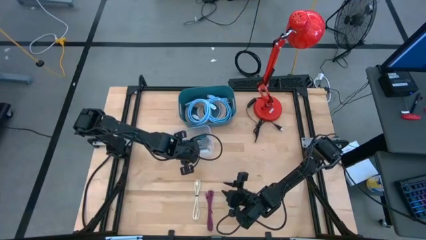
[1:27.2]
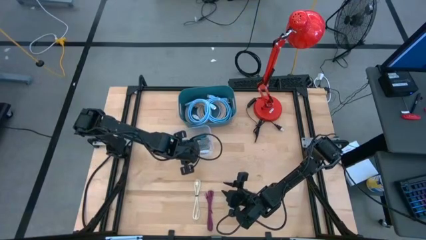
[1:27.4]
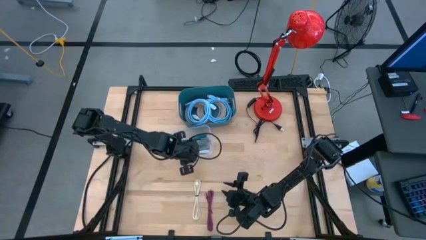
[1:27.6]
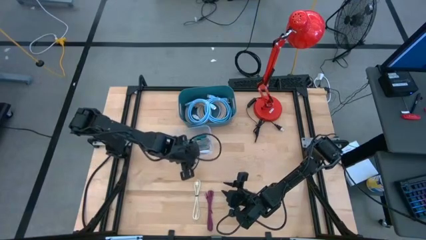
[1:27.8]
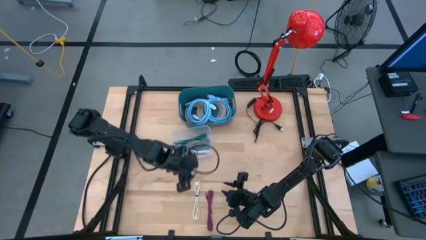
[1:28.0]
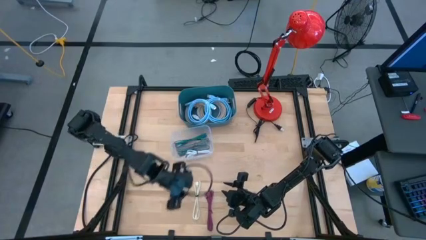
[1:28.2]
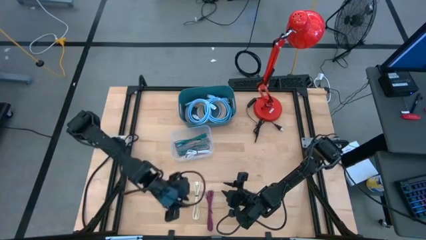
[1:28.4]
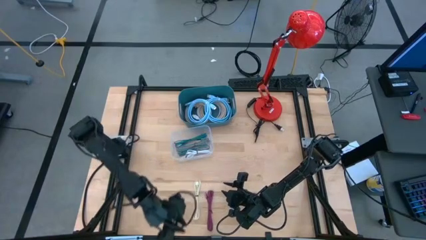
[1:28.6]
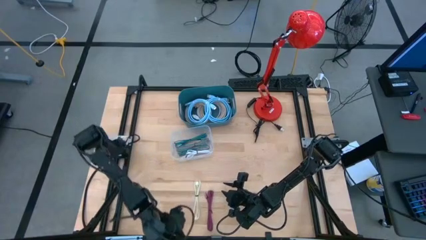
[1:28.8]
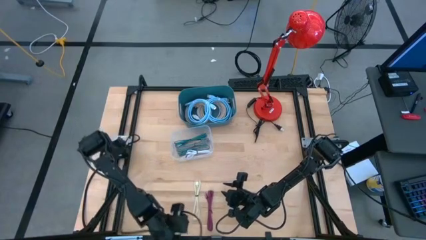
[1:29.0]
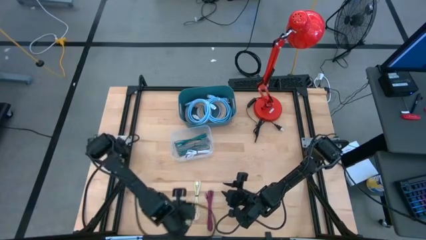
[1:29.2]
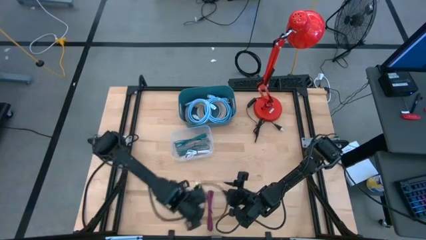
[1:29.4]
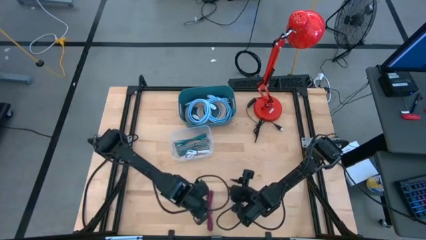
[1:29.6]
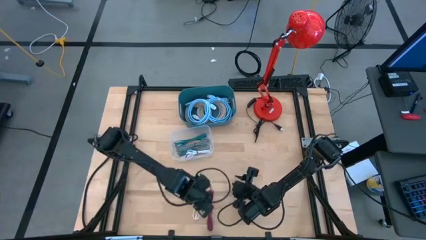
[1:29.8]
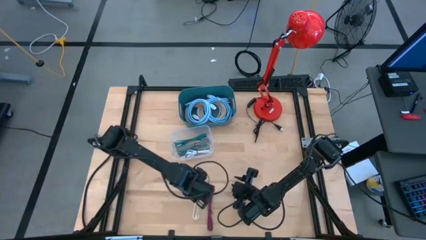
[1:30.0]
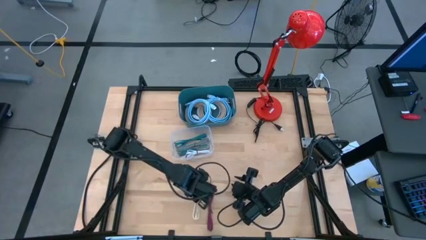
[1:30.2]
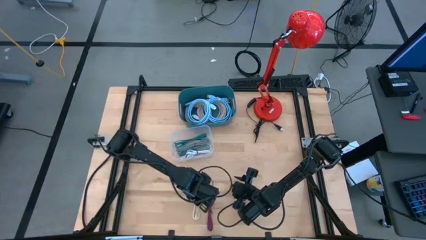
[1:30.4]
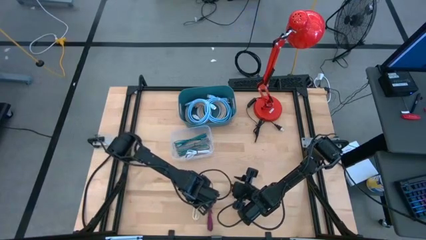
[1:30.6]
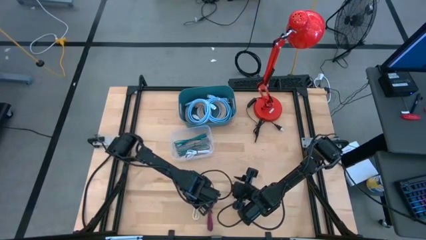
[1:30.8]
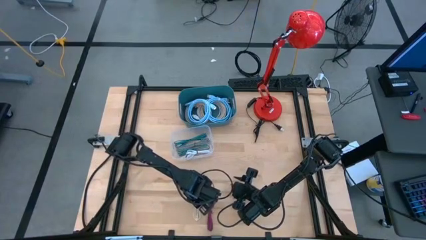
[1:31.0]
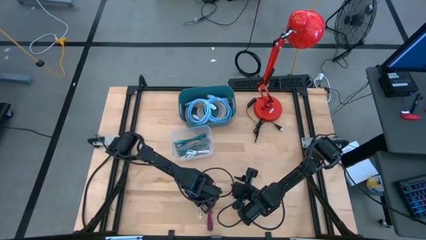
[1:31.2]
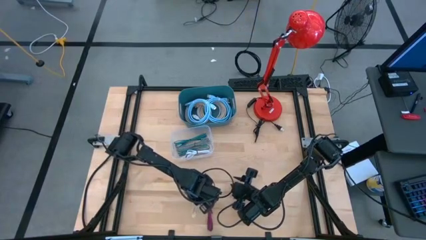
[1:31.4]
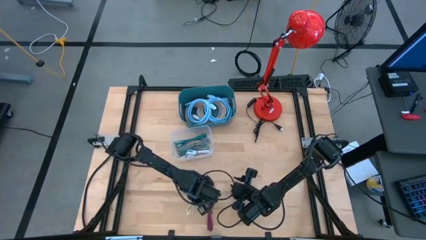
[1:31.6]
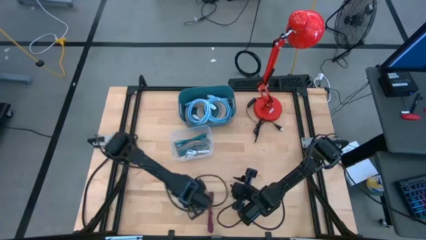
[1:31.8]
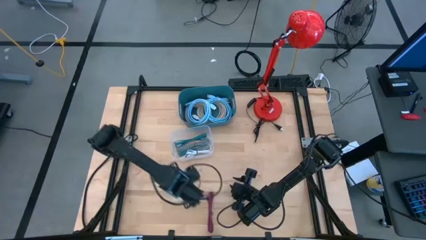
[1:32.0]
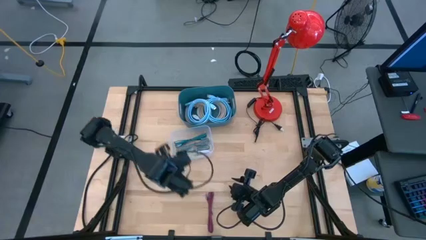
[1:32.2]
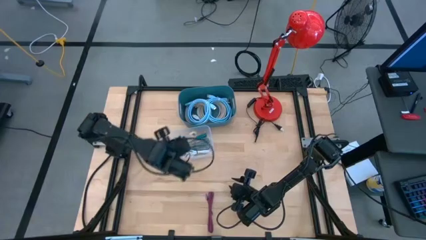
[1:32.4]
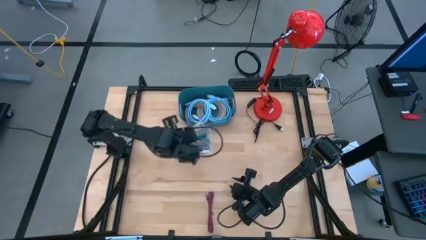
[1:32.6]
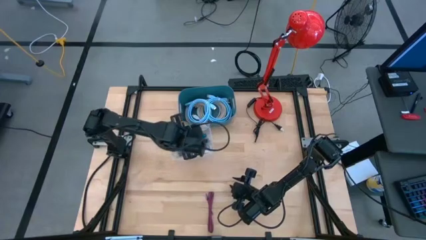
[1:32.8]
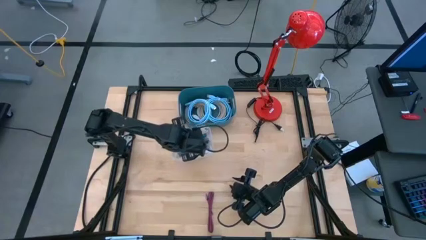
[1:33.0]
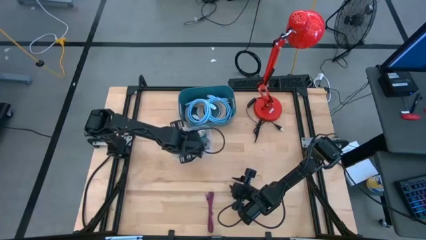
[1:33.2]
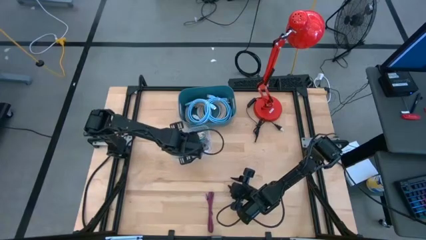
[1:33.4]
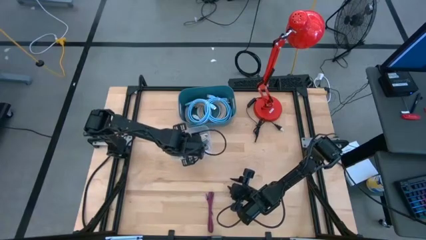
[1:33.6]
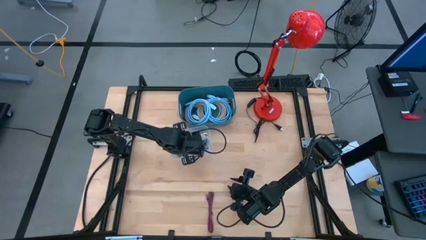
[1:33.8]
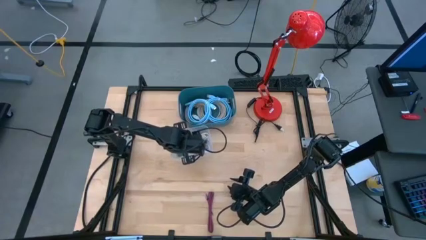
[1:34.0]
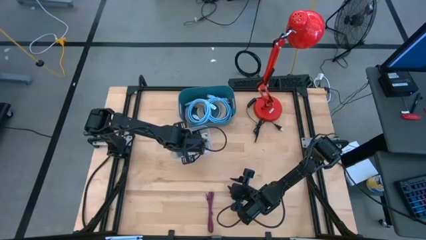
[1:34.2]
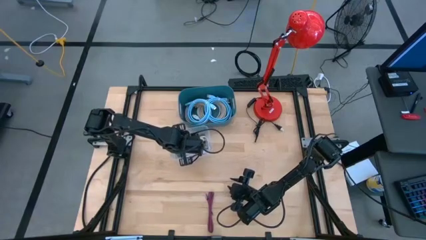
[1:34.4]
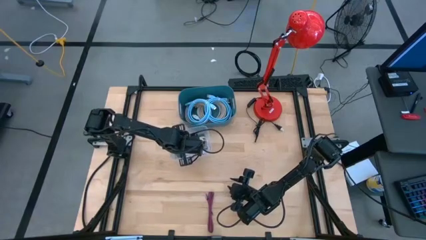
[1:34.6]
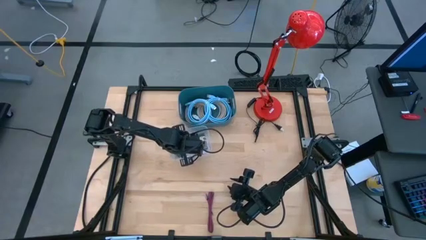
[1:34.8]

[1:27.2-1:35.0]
Task: Pick & Place USB Port
Put the light brown charger cable into the transparent bin

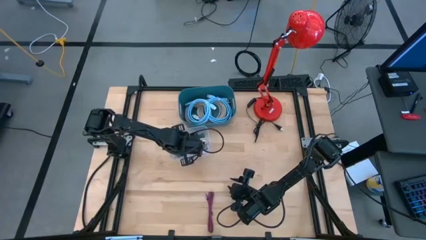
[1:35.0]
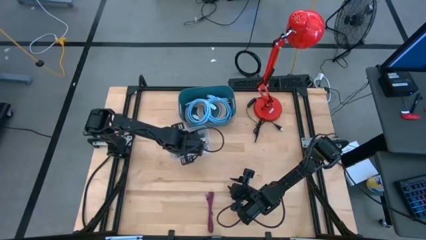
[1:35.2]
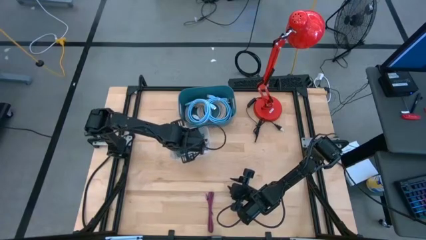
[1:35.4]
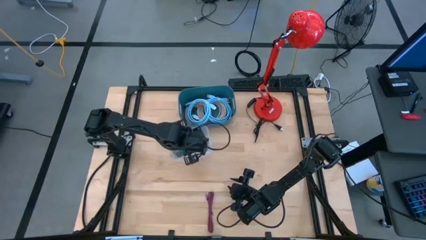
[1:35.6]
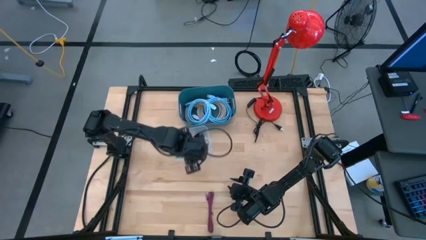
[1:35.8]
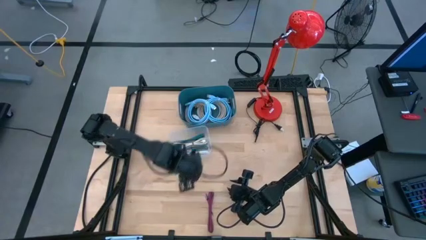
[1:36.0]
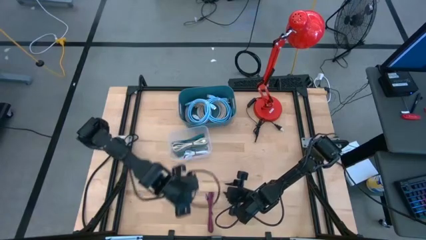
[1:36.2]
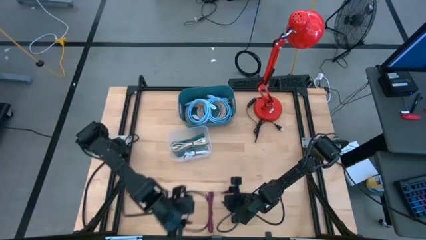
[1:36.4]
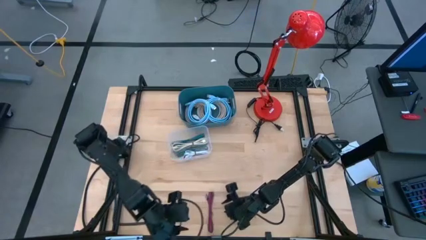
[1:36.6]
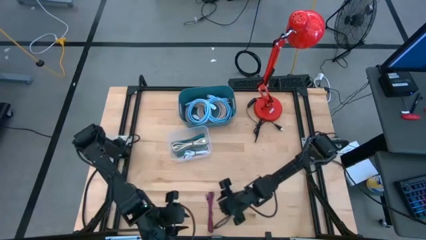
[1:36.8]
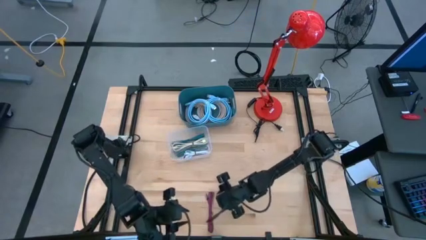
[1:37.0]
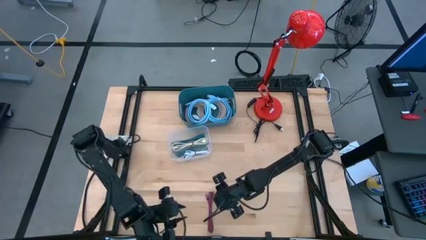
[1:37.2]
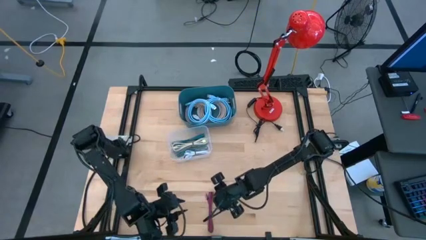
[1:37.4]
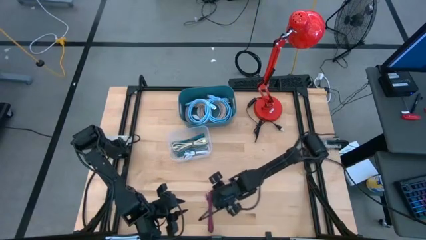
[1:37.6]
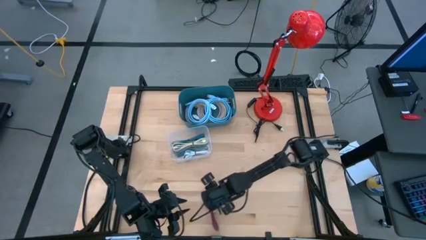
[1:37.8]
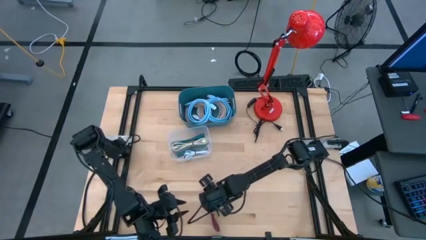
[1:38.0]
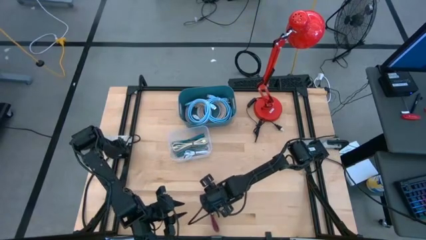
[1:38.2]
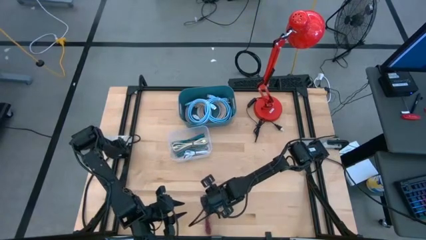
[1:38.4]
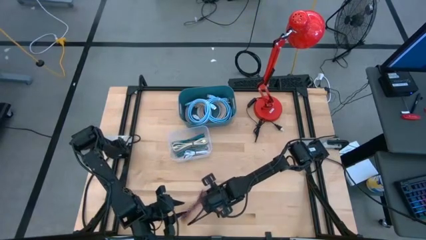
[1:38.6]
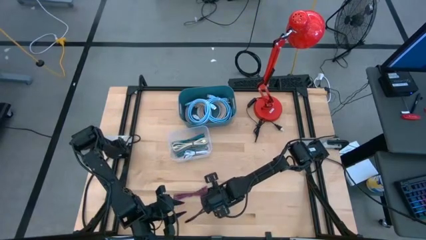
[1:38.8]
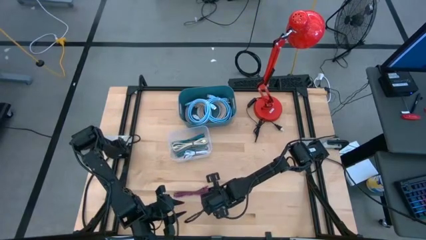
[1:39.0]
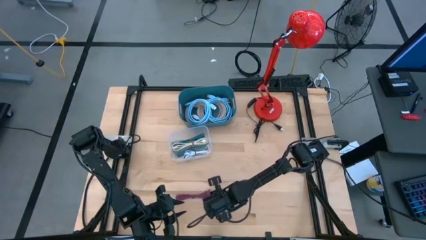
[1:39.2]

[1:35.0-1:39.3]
Put the pink charger cable into the transparent bin
